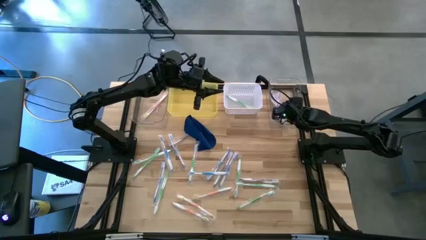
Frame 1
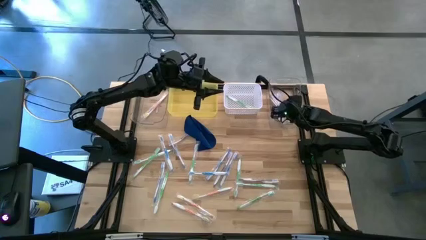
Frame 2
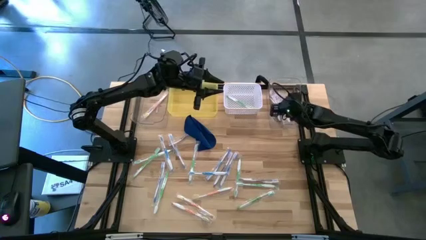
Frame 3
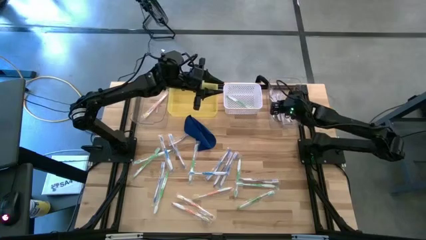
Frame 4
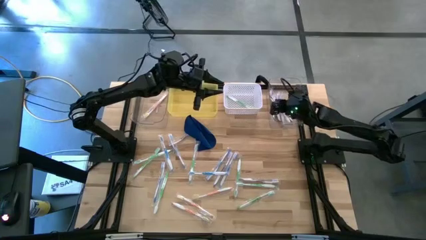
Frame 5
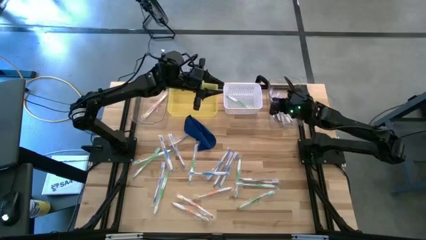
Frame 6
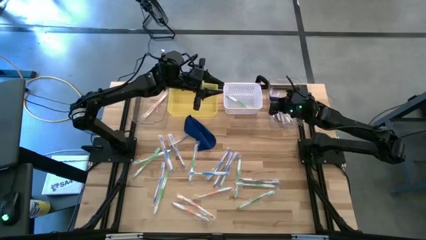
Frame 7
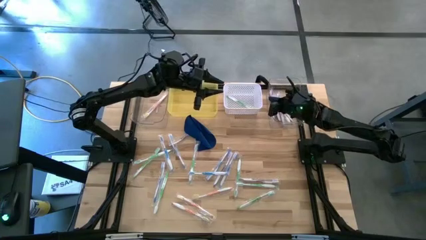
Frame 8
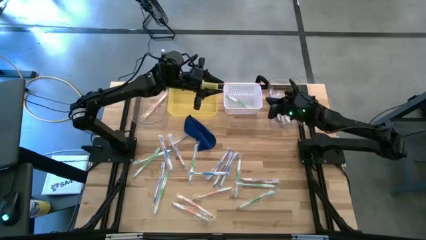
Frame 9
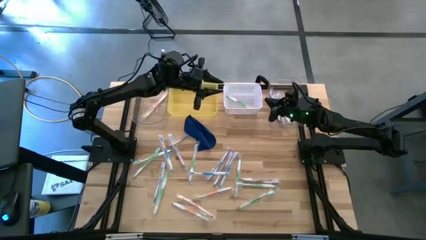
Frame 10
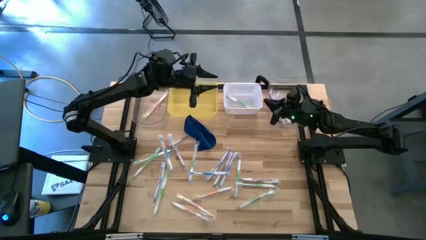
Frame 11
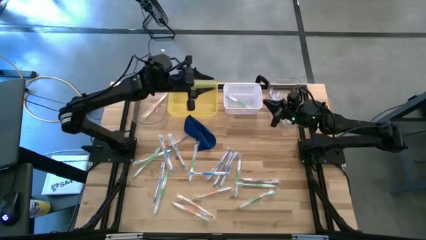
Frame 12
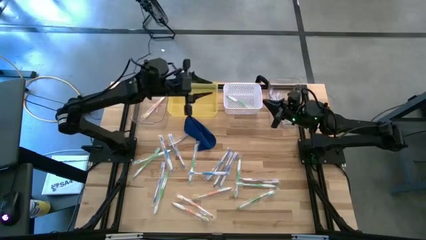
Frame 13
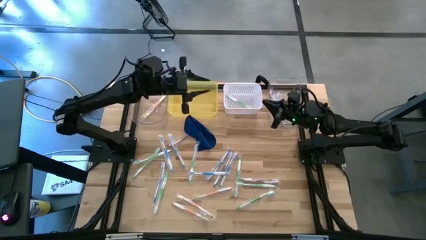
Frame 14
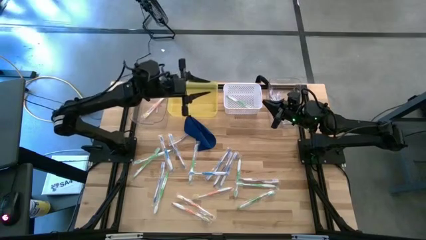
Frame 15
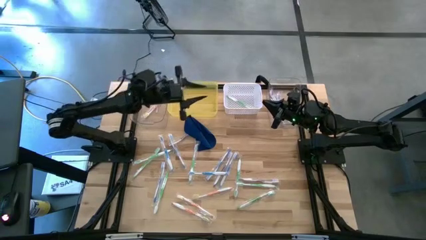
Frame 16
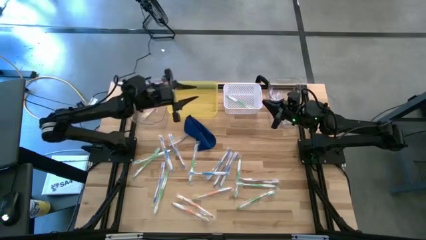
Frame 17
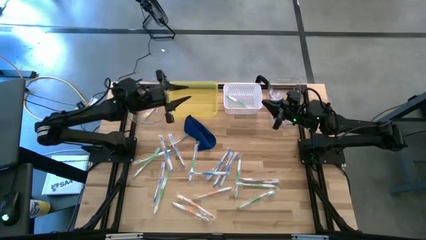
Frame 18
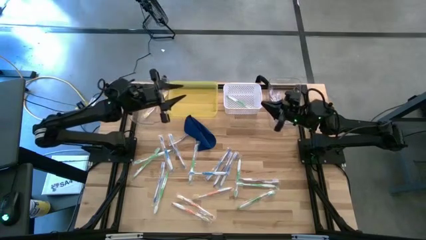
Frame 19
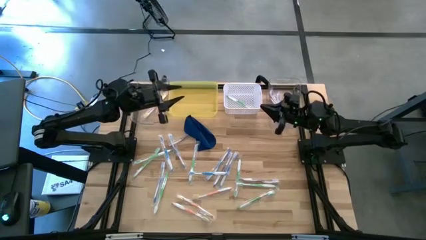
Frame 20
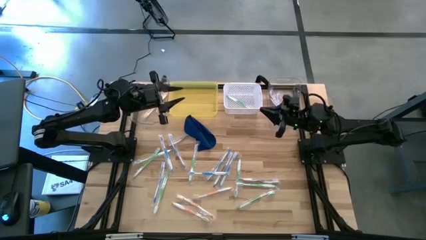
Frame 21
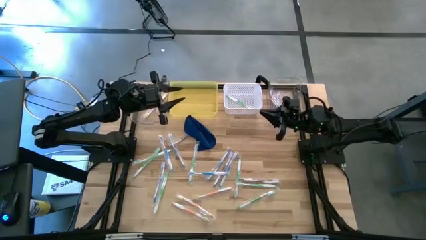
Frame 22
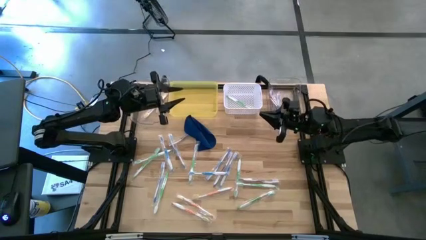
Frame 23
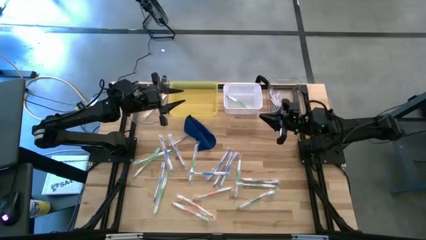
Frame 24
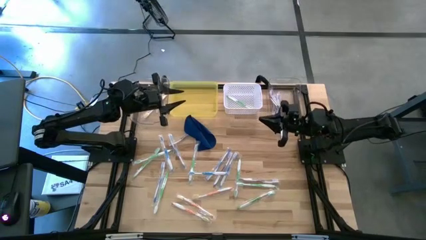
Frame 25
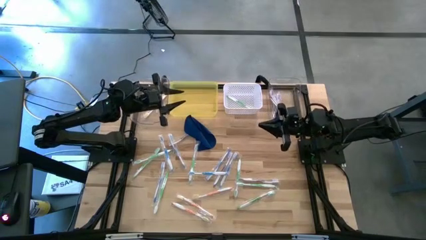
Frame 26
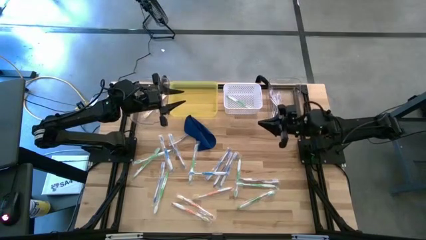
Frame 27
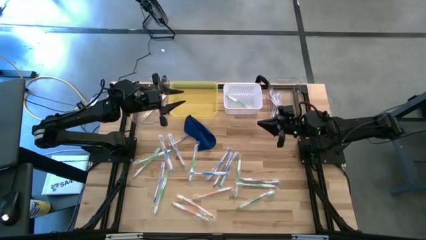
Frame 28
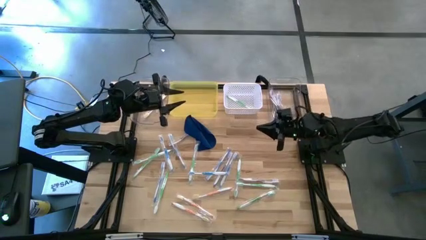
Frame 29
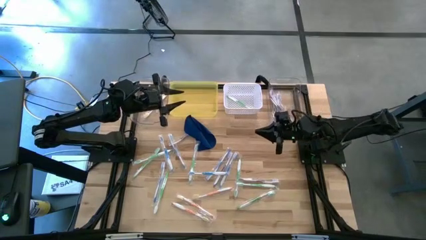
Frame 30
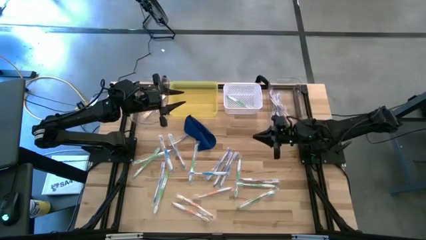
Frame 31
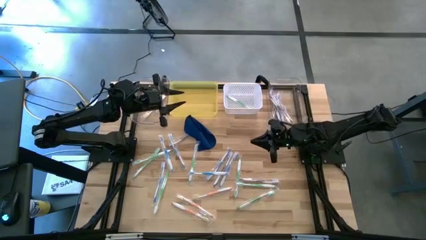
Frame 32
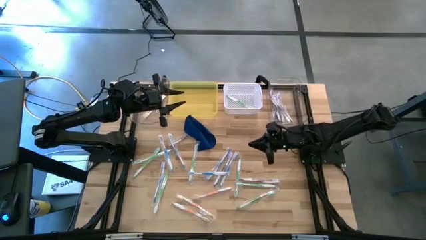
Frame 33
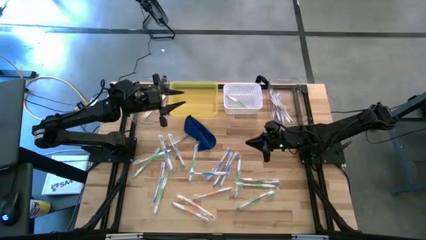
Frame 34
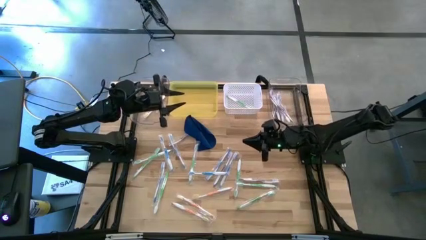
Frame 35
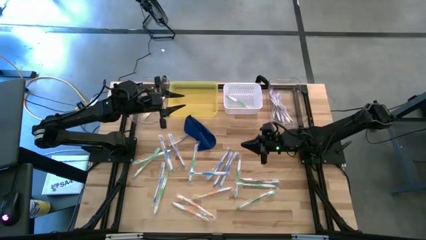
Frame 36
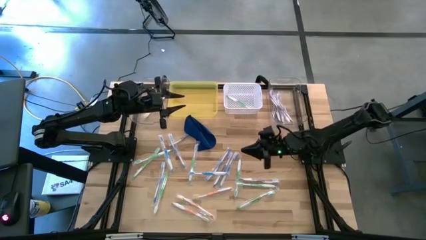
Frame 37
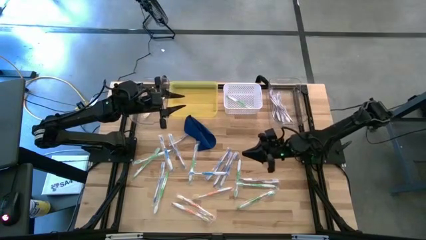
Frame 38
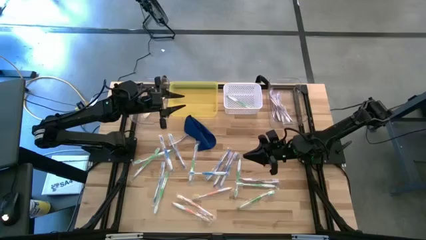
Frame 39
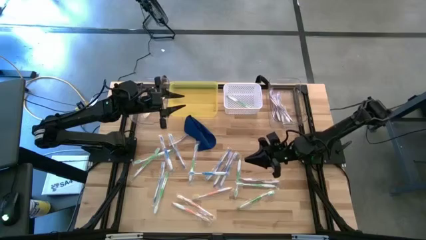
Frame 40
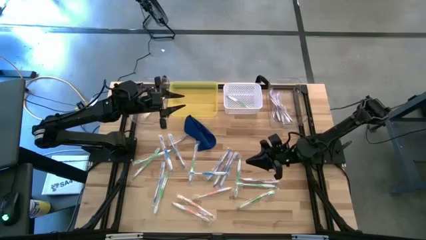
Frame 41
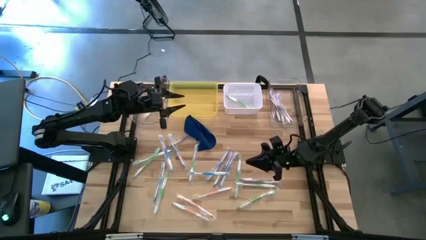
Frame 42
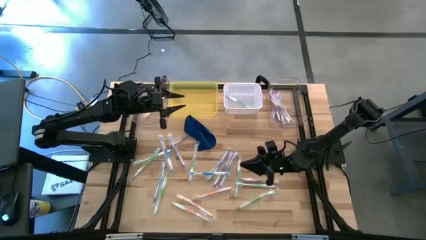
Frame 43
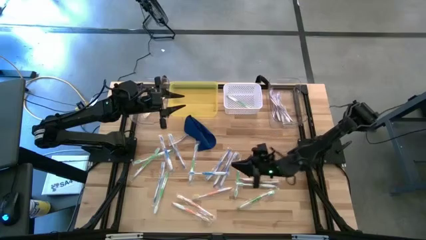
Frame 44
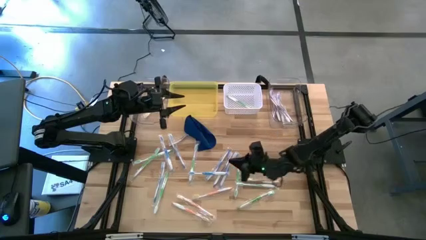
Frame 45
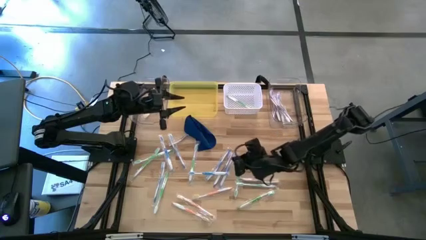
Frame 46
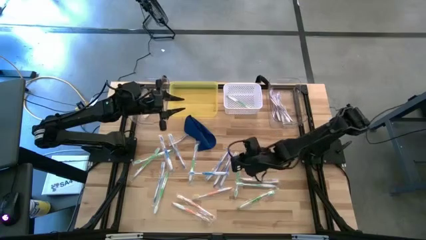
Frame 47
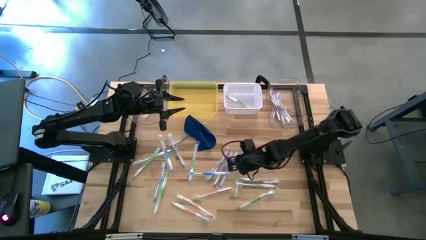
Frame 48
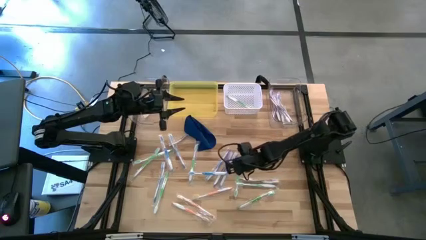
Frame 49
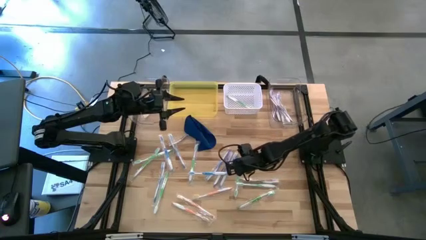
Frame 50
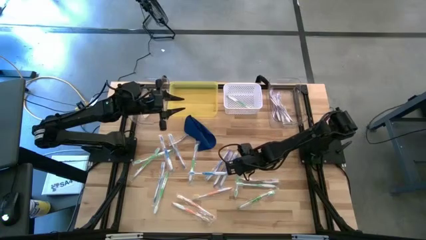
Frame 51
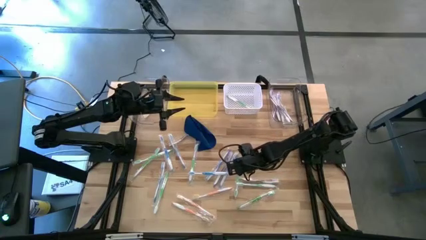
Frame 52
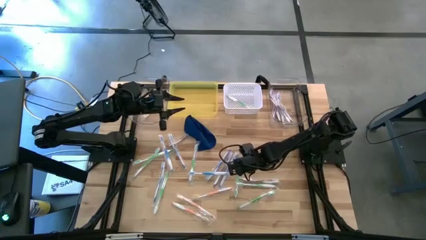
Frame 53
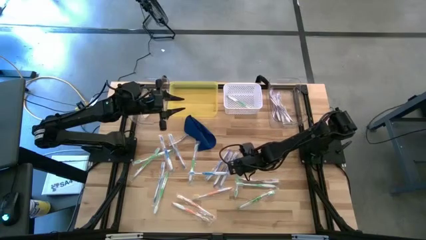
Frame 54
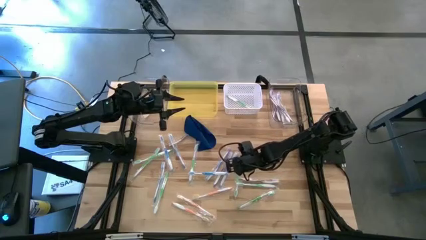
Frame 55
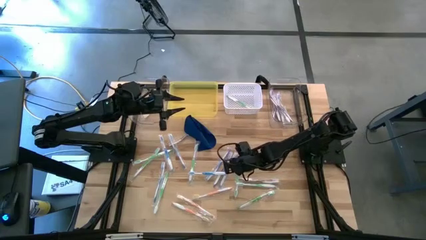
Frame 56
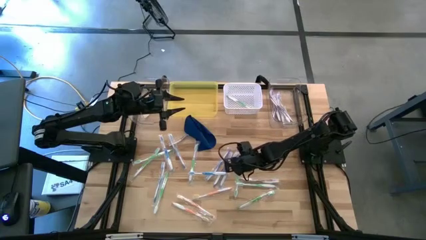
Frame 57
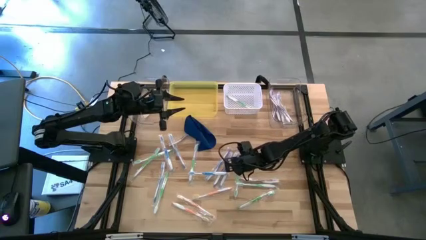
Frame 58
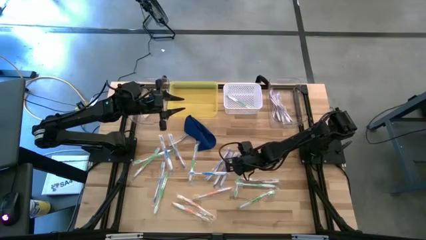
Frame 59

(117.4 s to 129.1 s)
Task: Pick & Place Toothbrushes
Put the green toothbrush into the white bin

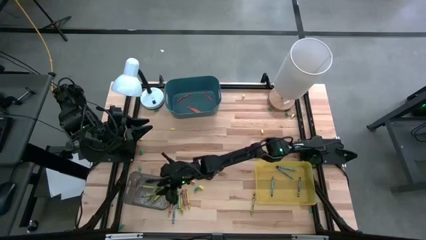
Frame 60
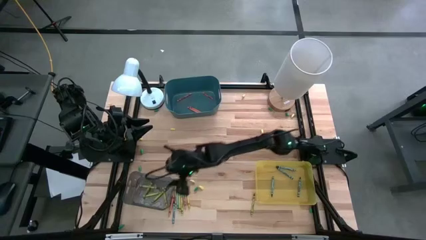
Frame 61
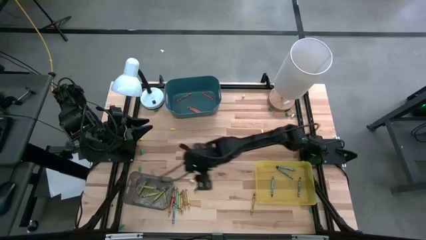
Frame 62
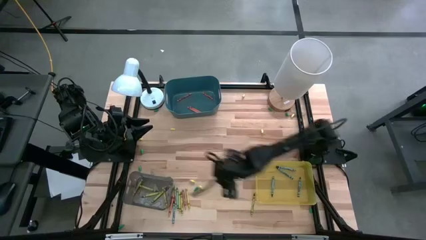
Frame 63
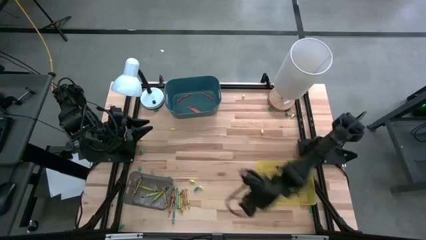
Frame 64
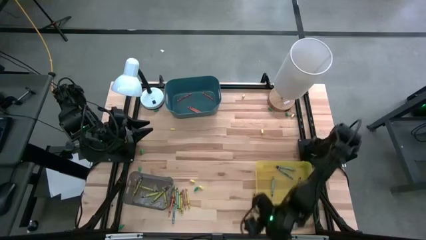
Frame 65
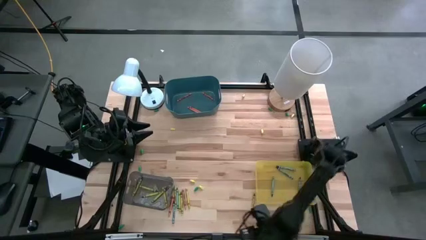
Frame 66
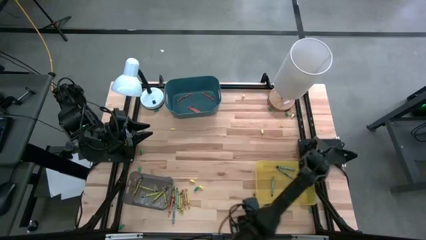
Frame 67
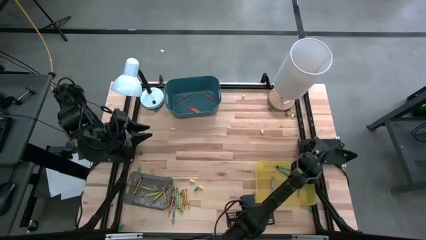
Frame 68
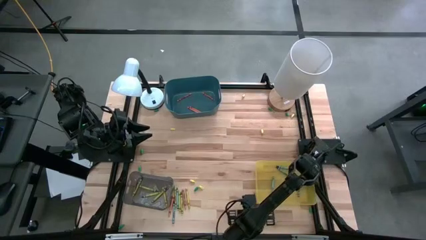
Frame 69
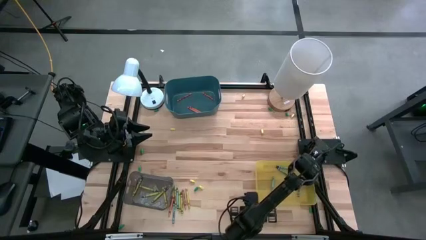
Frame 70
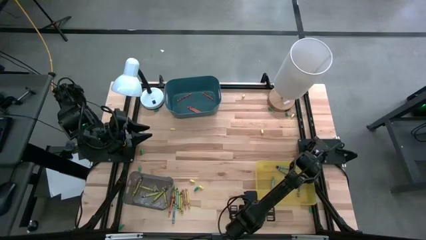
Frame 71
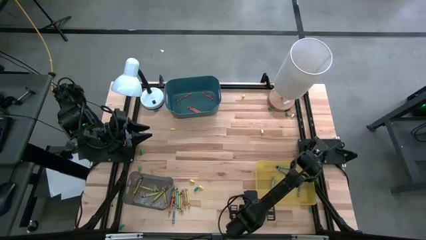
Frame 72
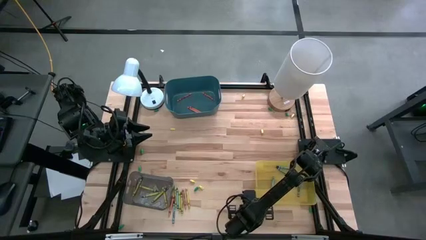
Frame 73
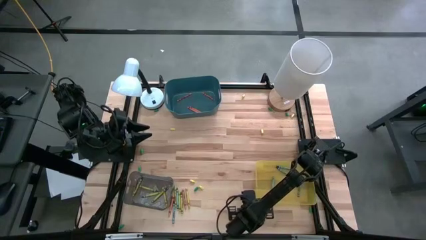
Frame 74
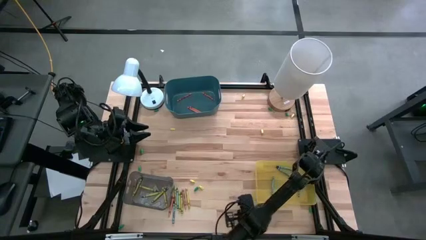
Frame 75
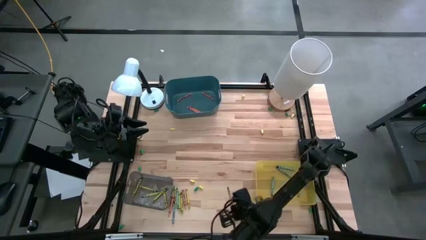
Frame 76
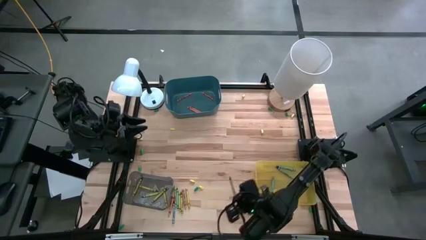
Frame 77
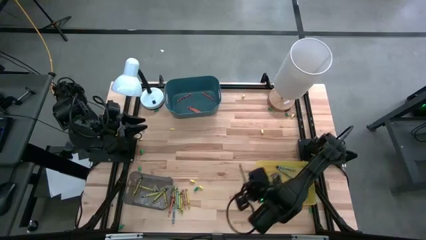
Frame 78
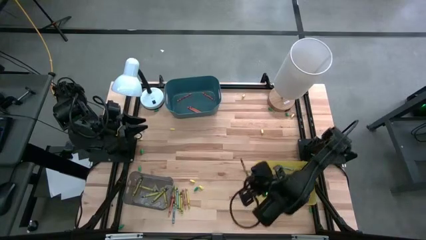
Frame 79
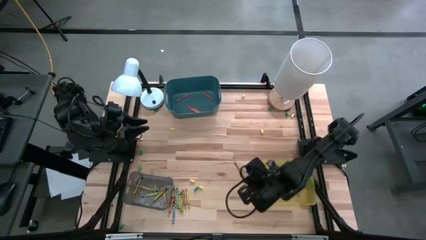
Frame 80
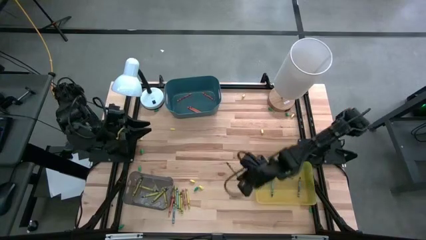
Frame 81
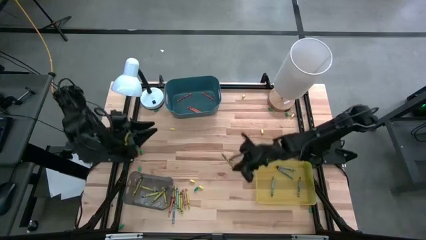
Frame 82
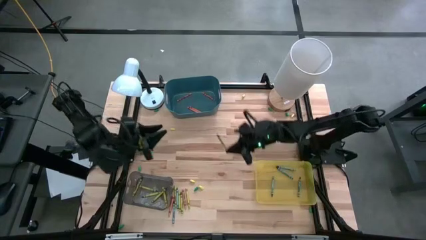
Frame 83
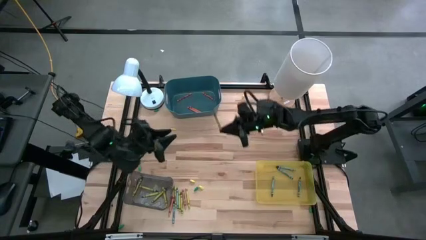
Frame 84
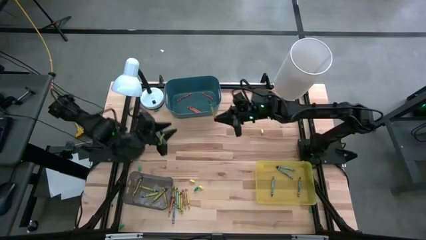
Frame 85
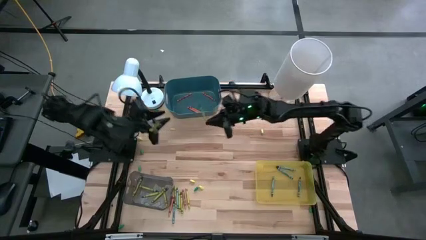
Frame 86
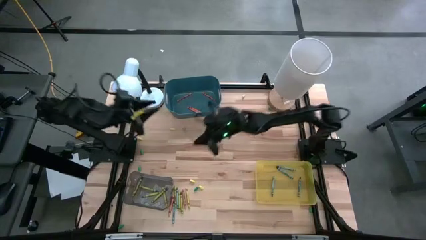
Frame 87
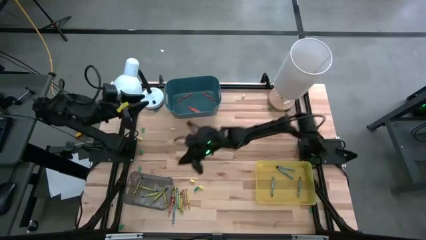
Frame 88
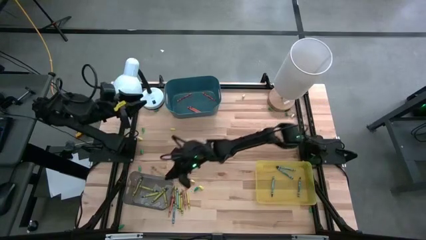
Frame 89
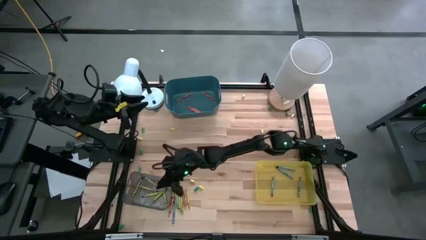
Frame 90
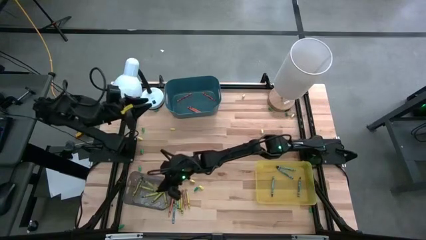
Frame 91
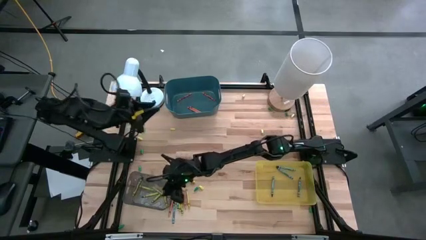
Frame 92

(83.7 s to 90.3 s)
Task: Sort crayons
Put the yellow crayon into the gray bin
